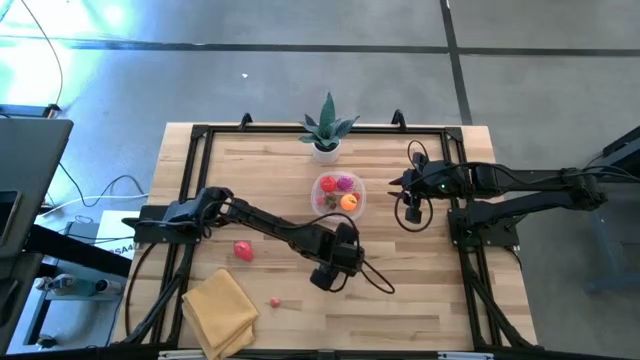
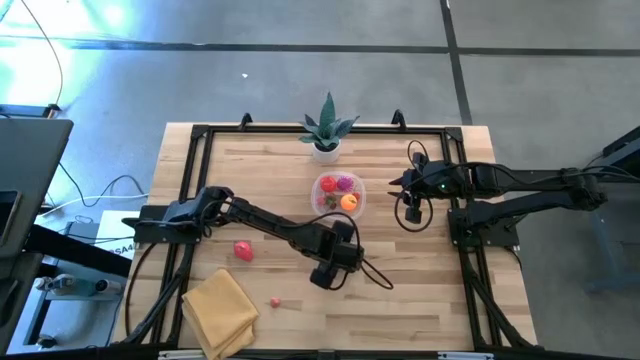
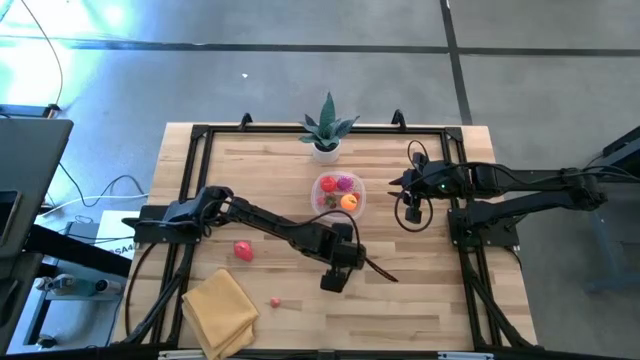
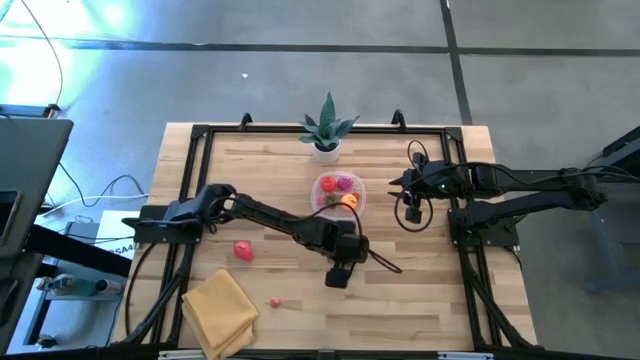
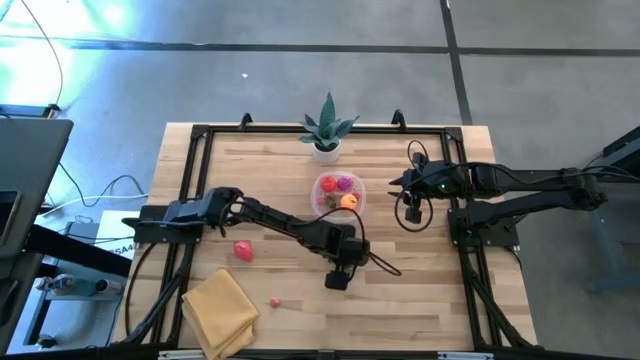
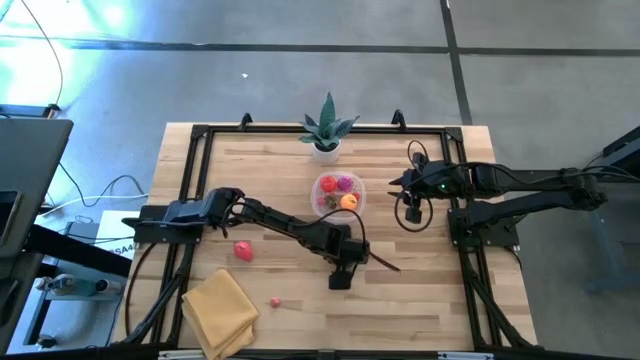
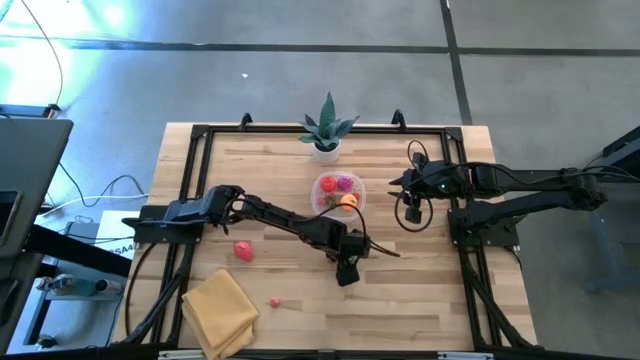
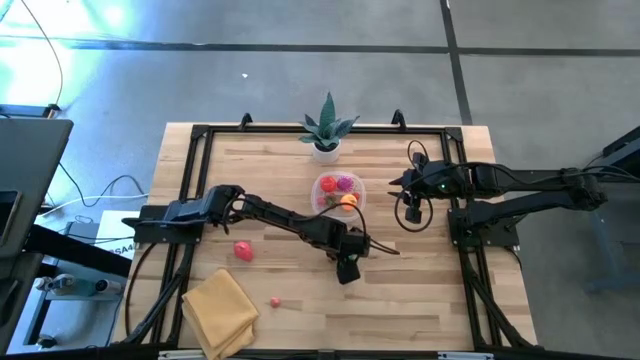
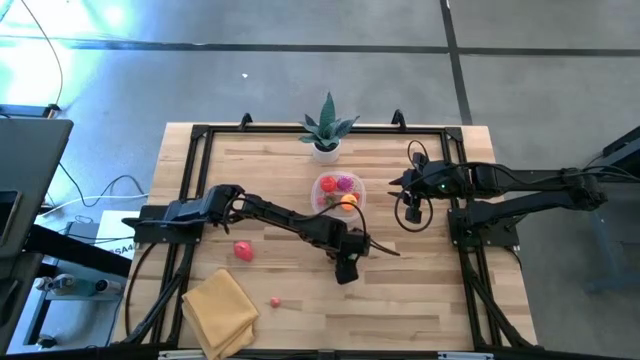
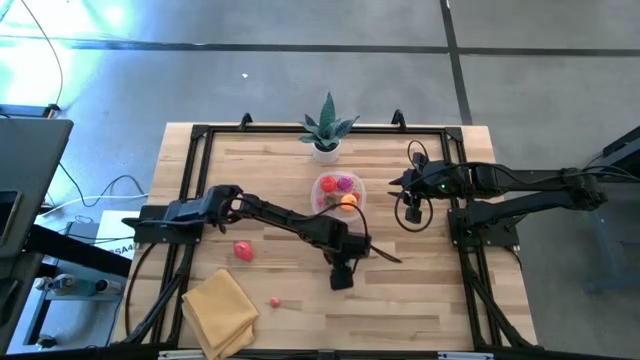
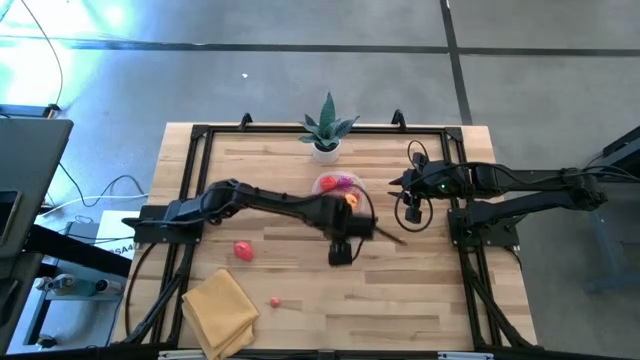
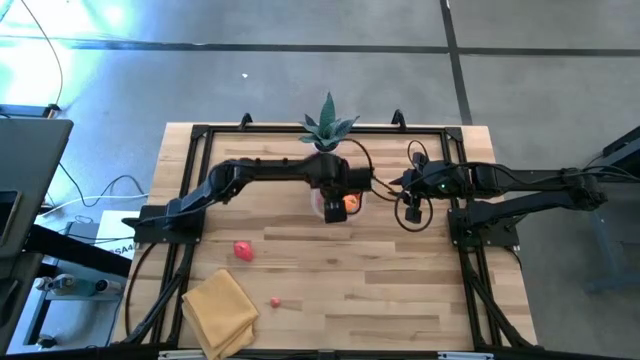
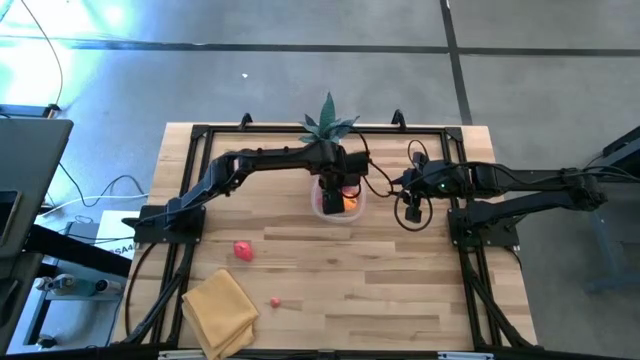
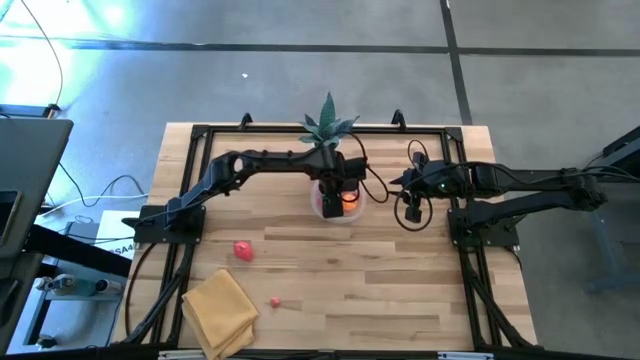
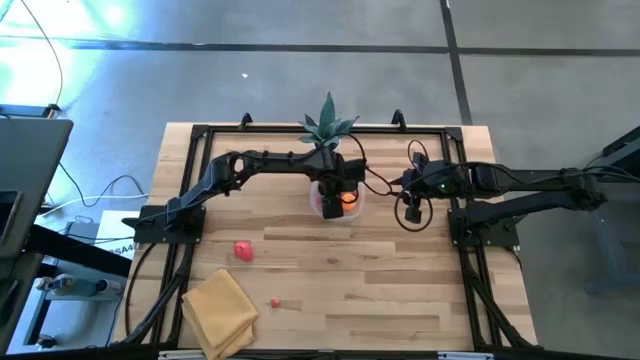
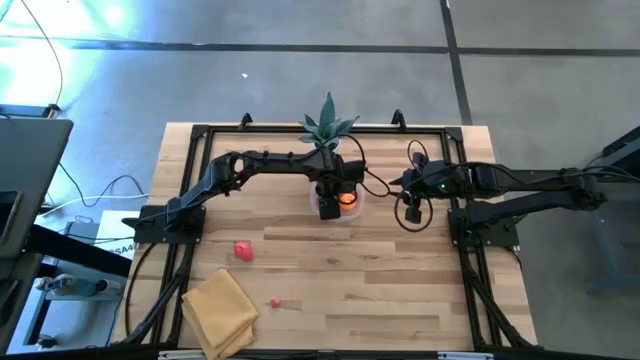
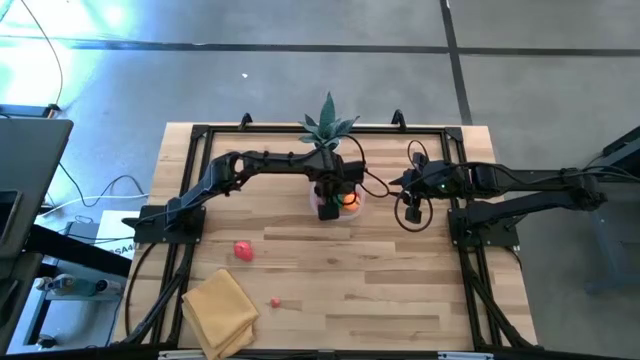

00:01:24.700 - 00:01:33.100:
Task: Pick and placing Produce into tupperware
Put the green bell pepper into the transparent container

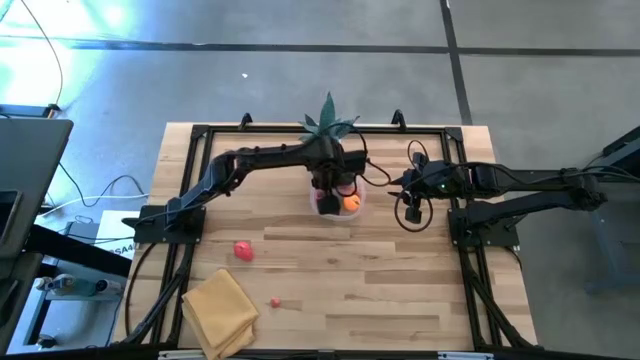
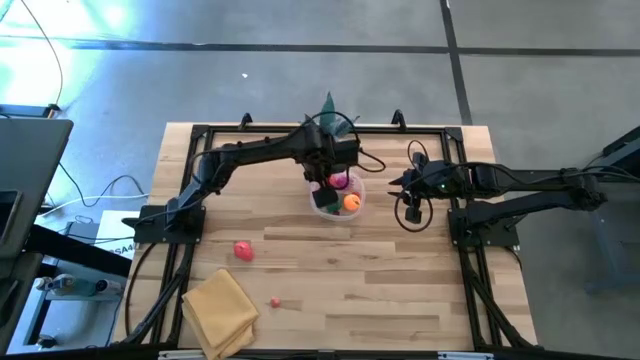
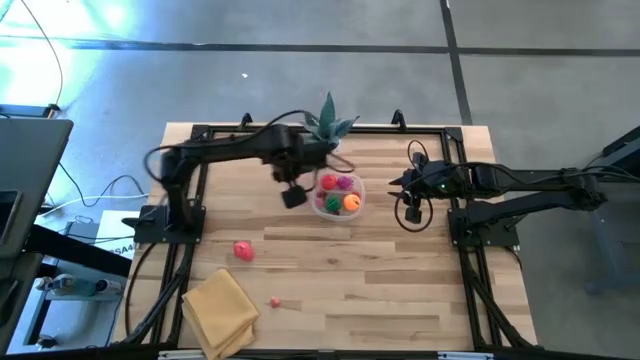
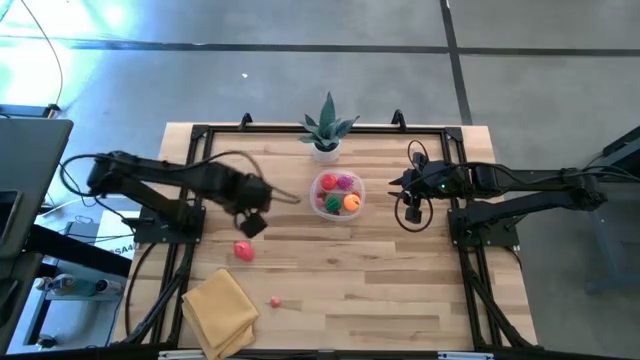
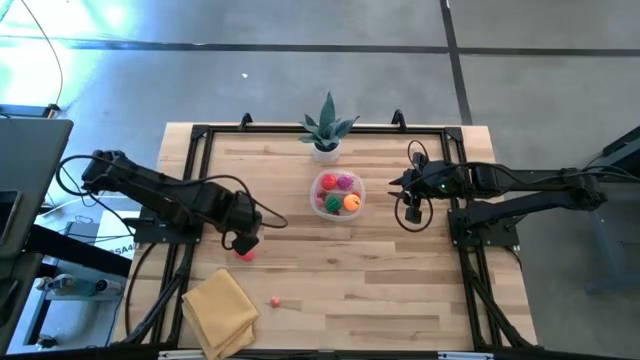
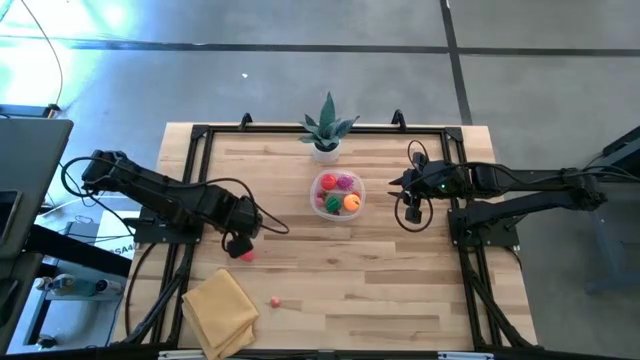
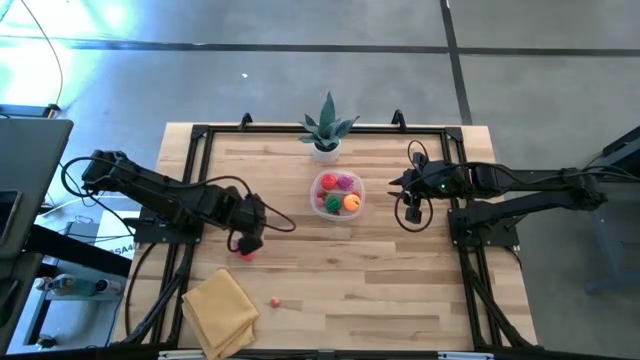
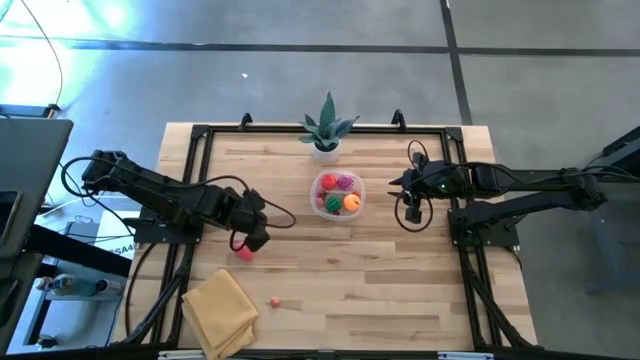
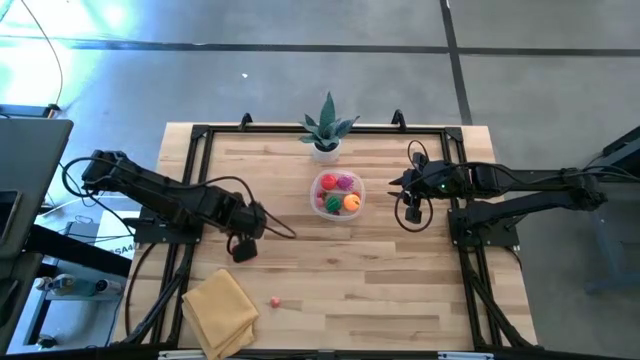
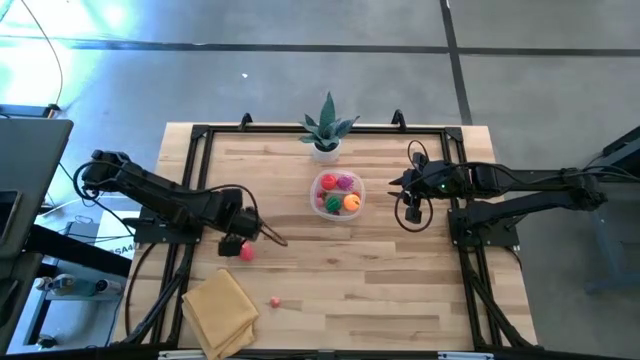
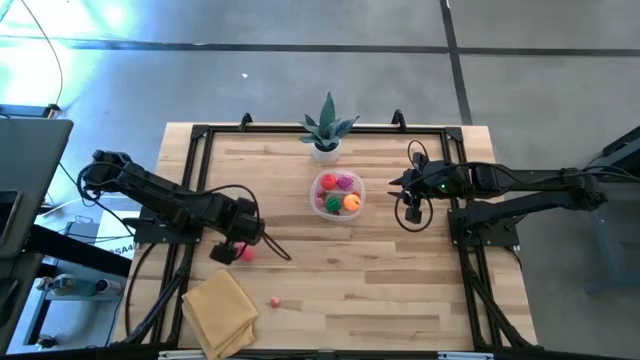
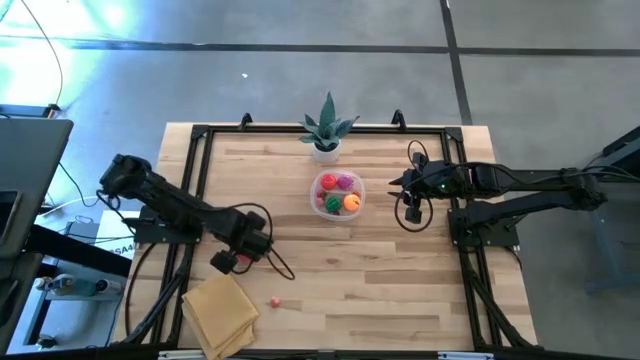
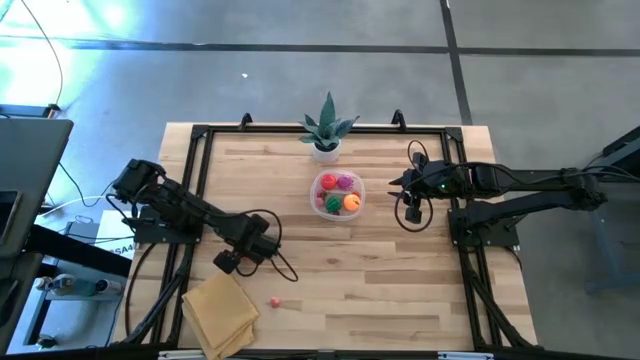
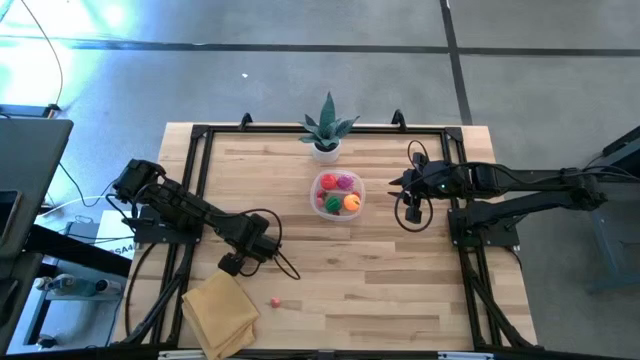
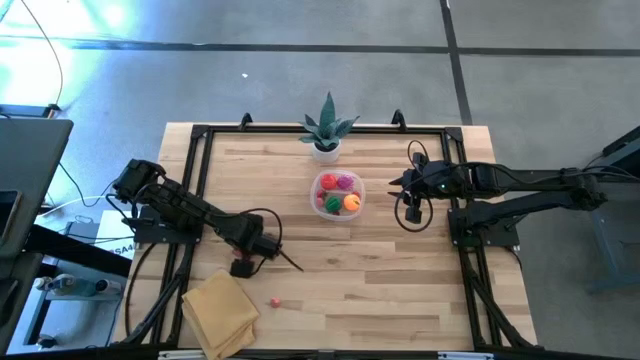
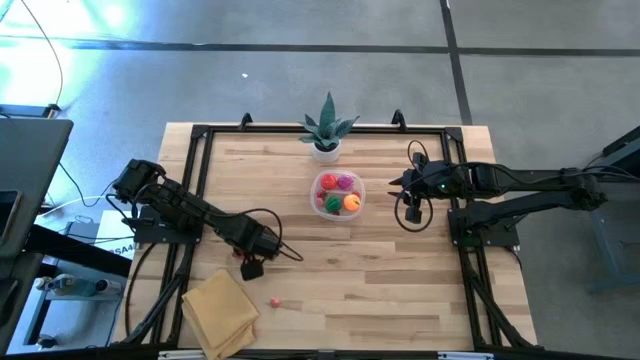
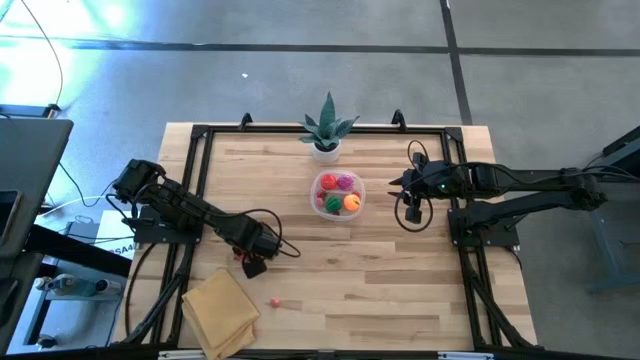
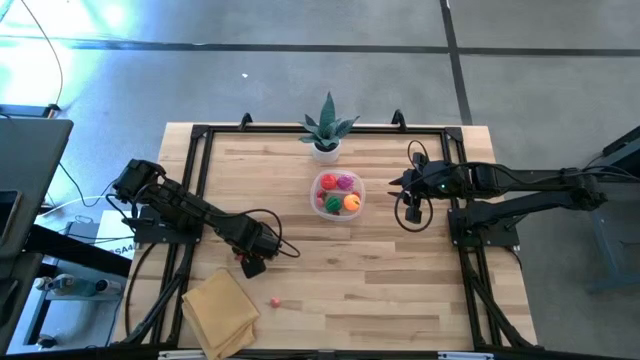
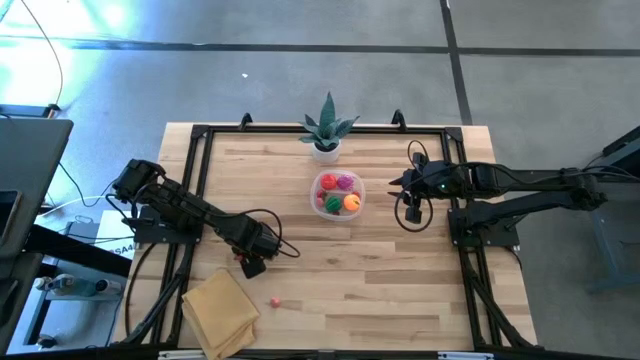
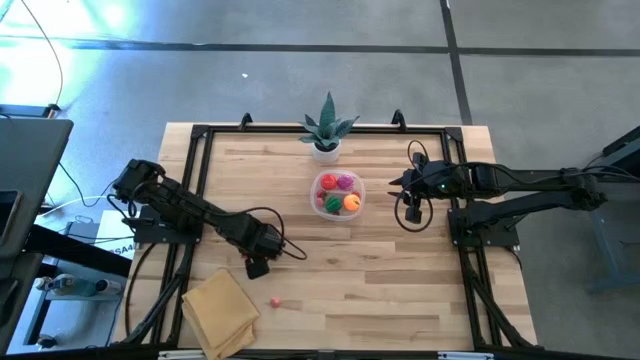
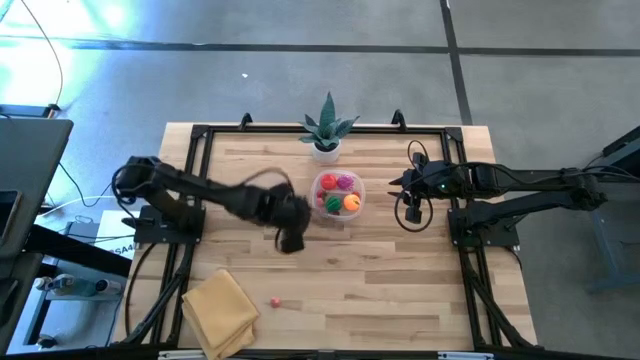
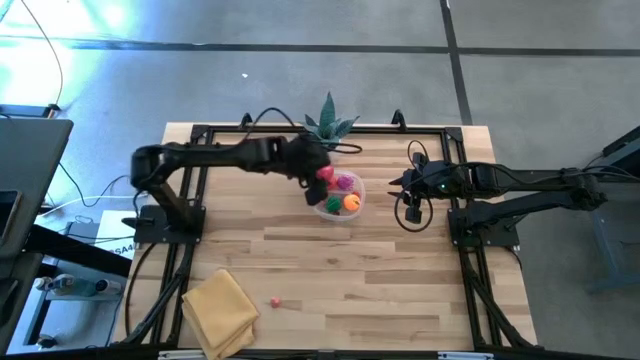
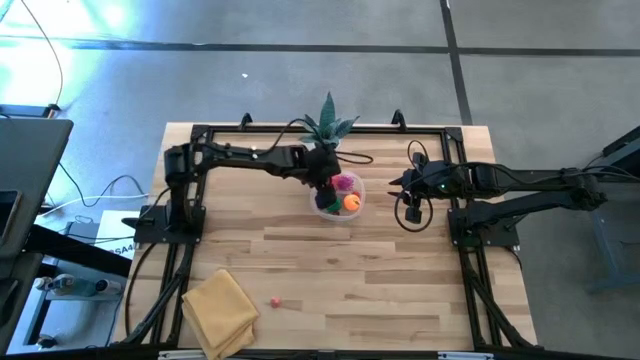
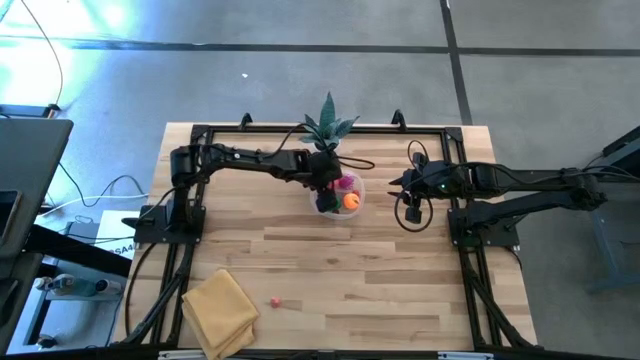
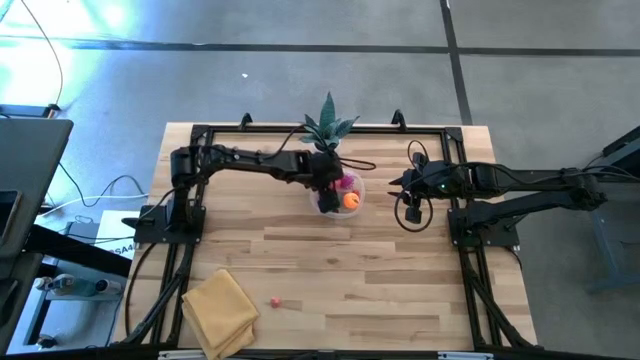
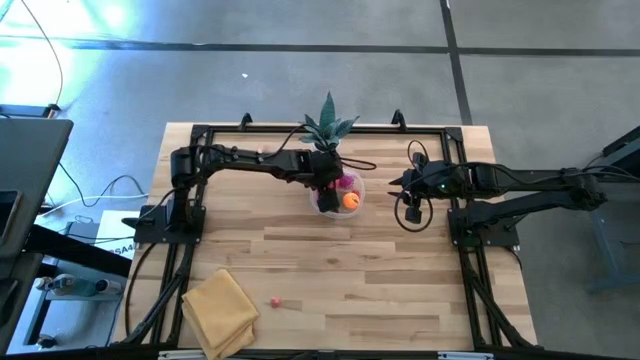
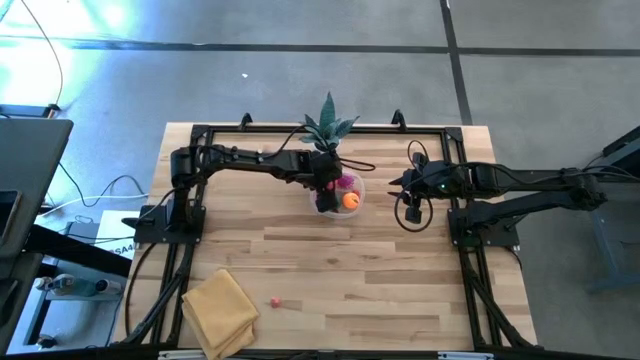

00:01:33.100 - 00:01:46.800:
Put the red dragon fruit into the transparent container
